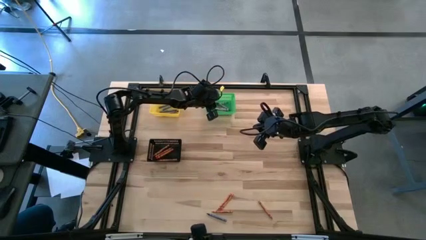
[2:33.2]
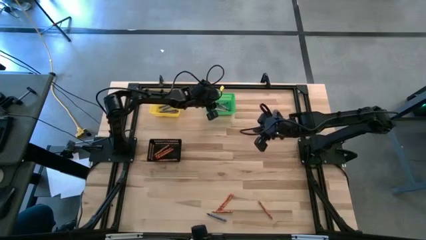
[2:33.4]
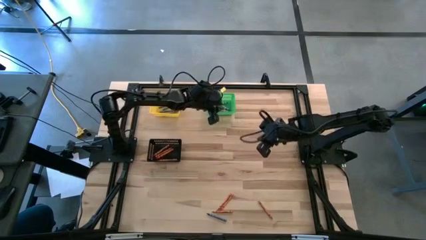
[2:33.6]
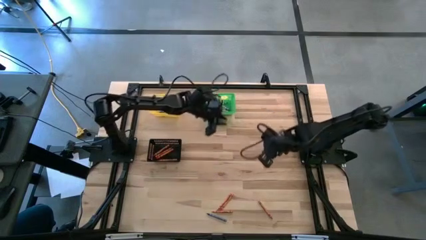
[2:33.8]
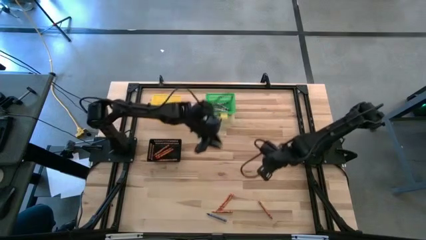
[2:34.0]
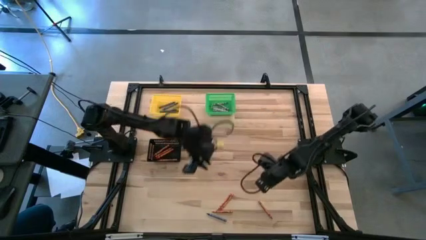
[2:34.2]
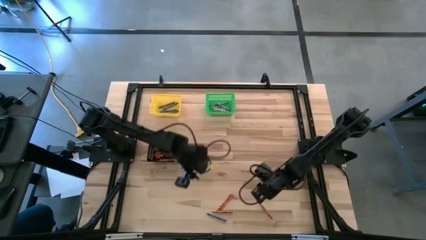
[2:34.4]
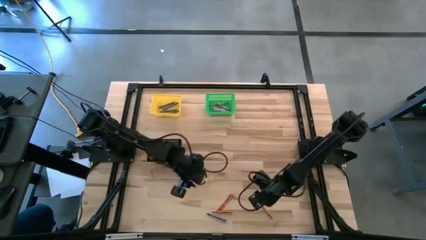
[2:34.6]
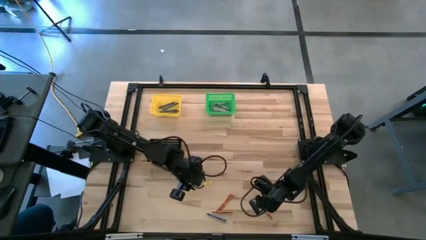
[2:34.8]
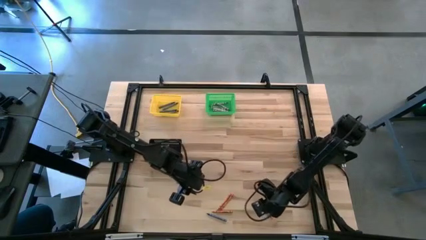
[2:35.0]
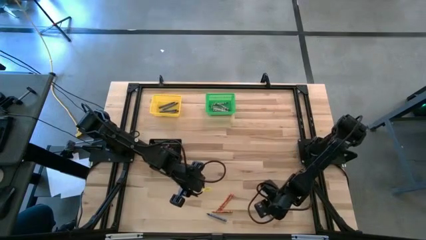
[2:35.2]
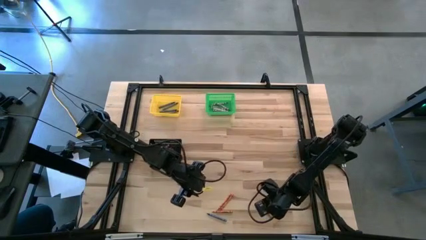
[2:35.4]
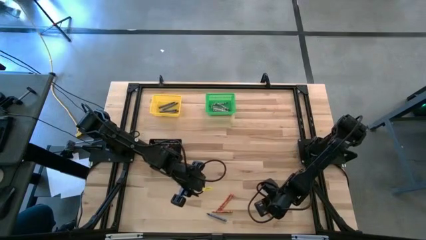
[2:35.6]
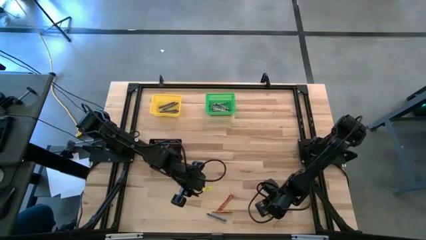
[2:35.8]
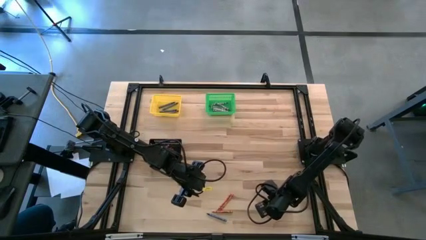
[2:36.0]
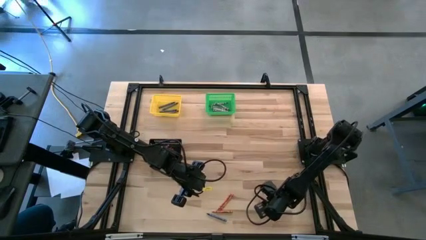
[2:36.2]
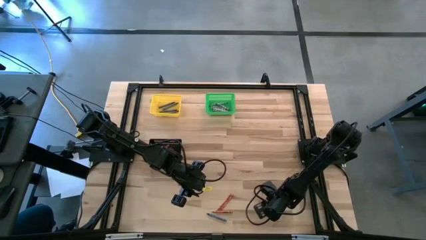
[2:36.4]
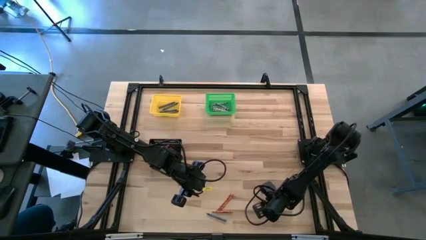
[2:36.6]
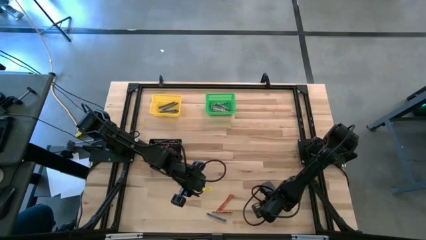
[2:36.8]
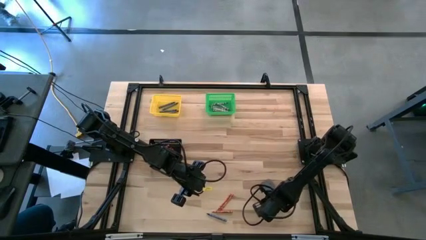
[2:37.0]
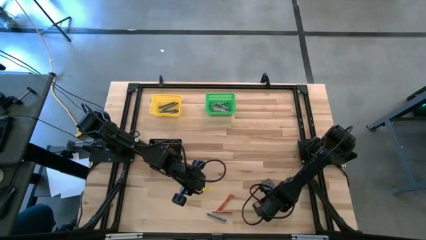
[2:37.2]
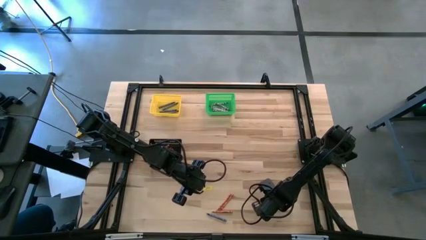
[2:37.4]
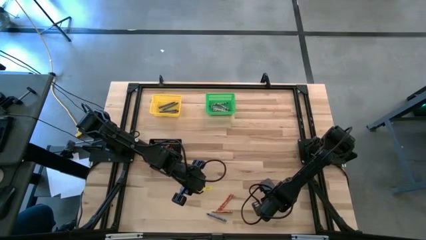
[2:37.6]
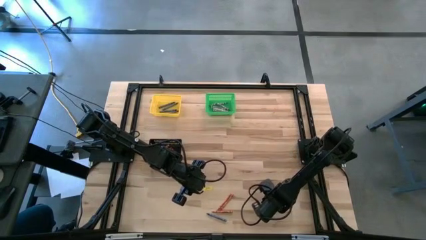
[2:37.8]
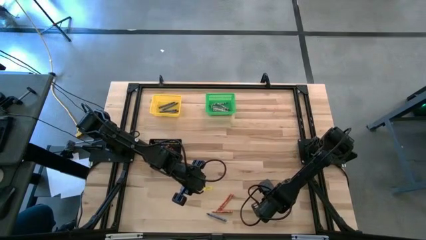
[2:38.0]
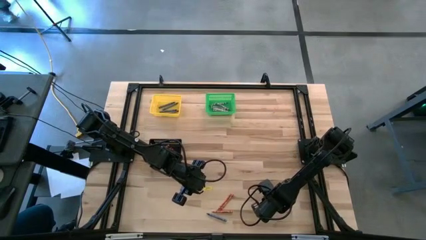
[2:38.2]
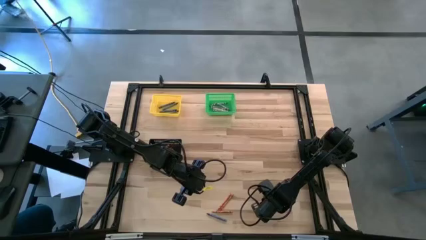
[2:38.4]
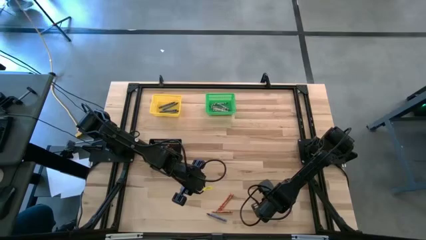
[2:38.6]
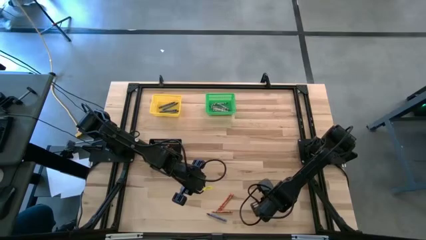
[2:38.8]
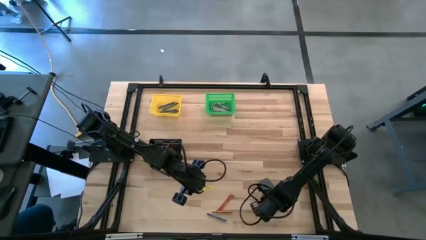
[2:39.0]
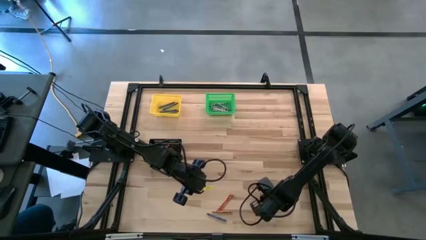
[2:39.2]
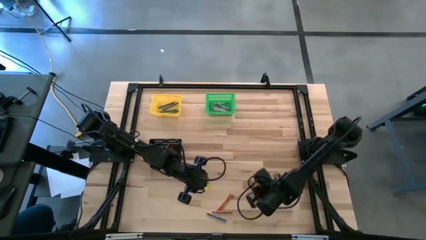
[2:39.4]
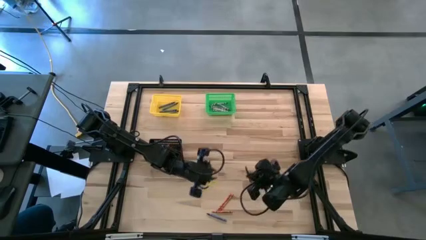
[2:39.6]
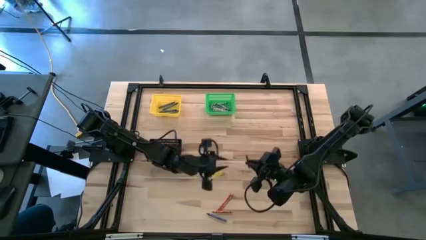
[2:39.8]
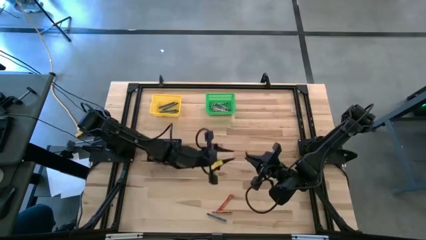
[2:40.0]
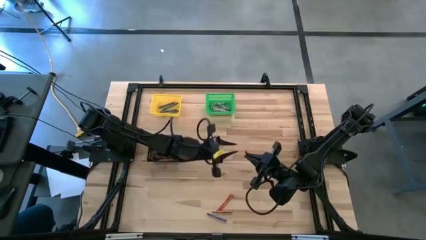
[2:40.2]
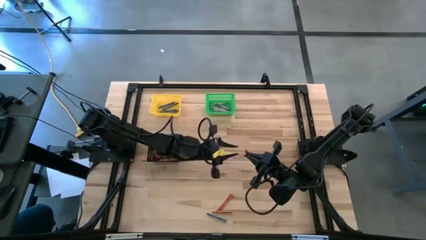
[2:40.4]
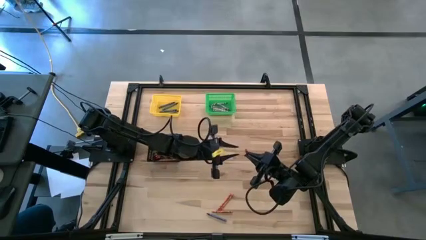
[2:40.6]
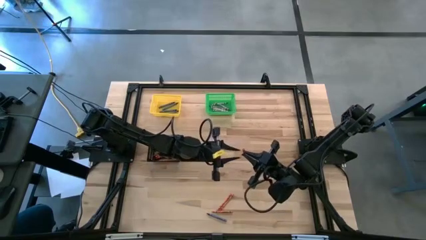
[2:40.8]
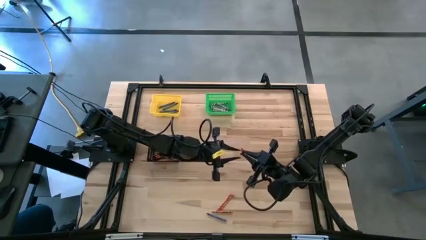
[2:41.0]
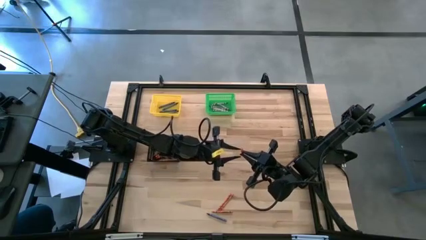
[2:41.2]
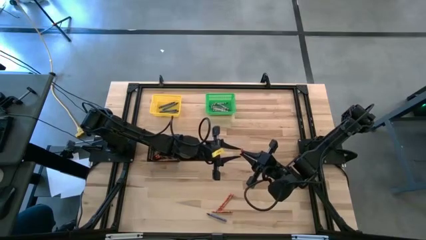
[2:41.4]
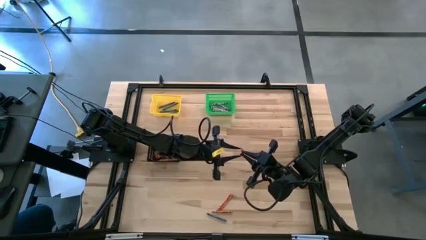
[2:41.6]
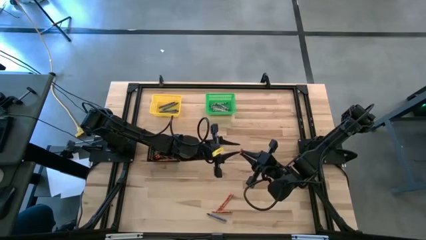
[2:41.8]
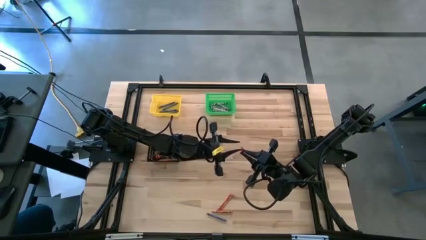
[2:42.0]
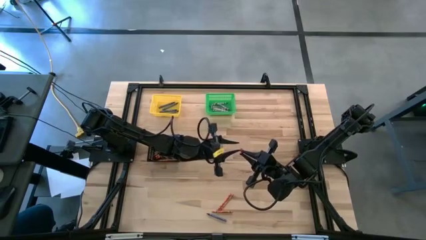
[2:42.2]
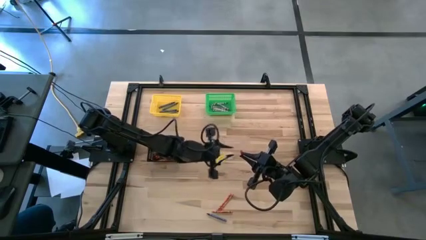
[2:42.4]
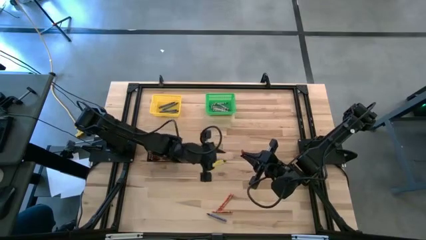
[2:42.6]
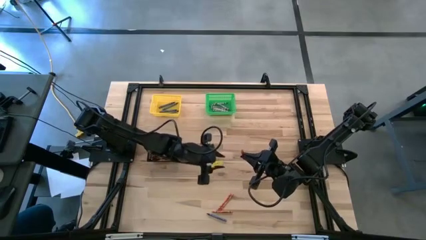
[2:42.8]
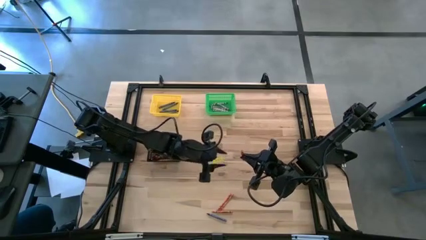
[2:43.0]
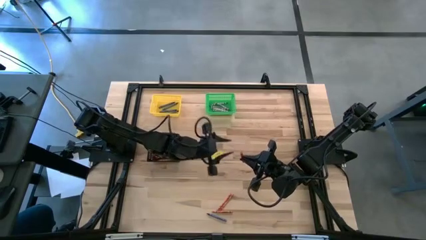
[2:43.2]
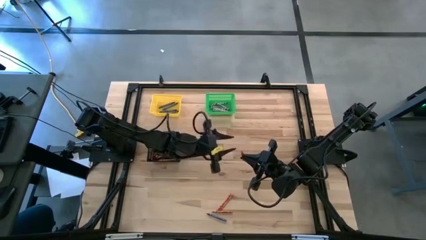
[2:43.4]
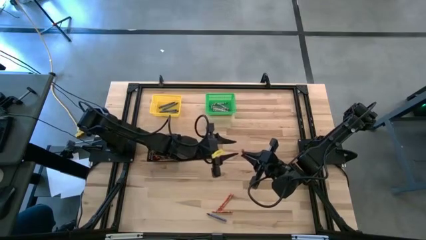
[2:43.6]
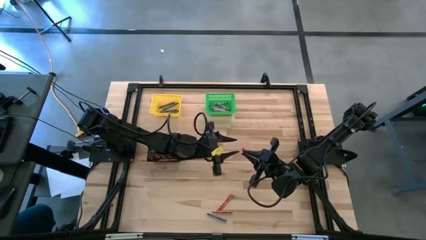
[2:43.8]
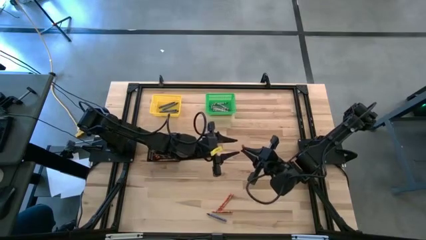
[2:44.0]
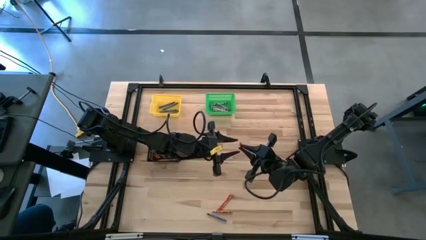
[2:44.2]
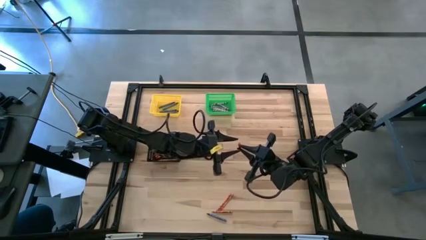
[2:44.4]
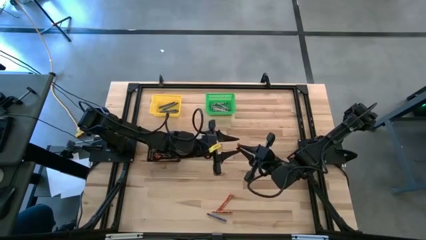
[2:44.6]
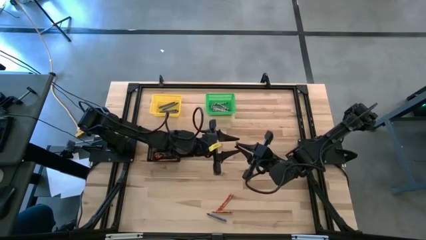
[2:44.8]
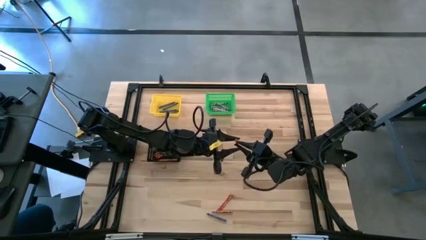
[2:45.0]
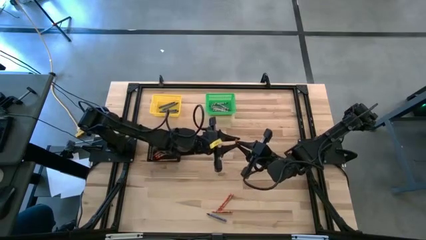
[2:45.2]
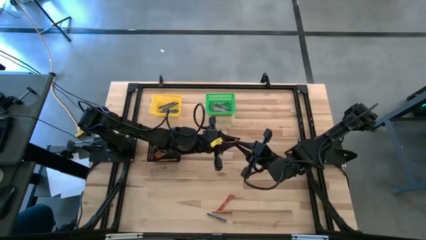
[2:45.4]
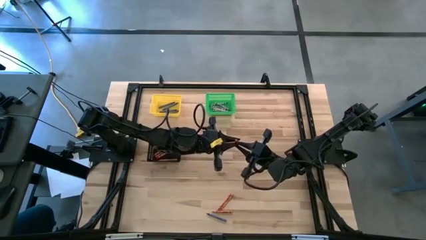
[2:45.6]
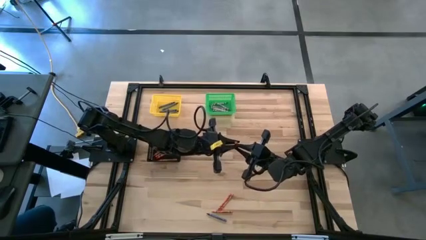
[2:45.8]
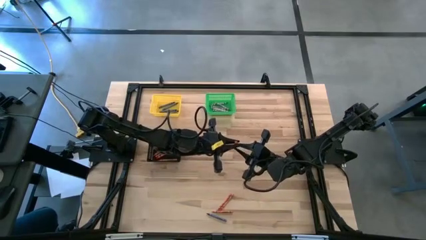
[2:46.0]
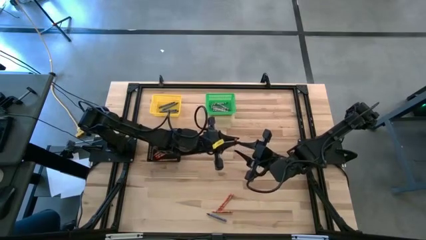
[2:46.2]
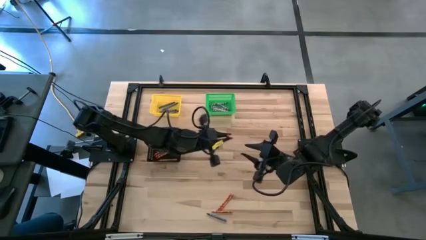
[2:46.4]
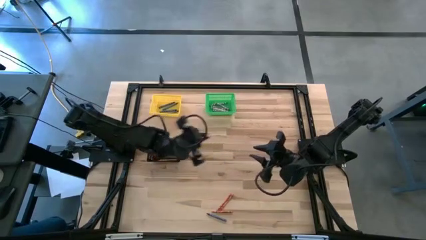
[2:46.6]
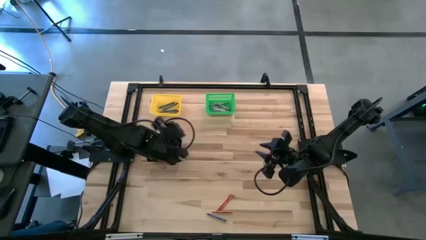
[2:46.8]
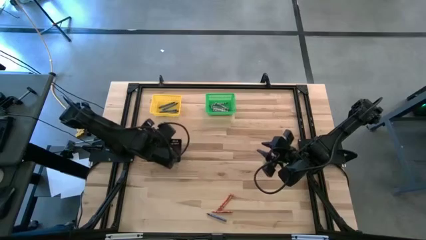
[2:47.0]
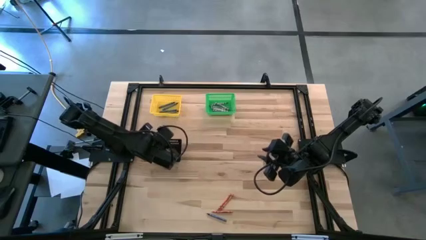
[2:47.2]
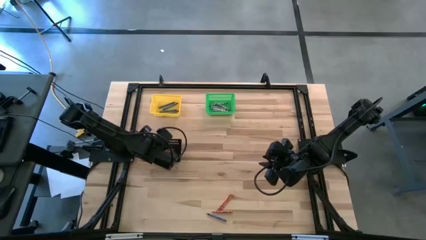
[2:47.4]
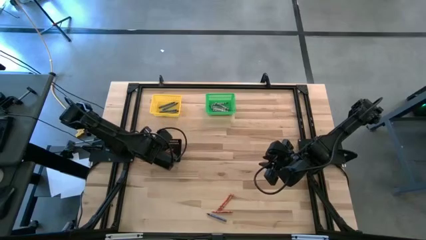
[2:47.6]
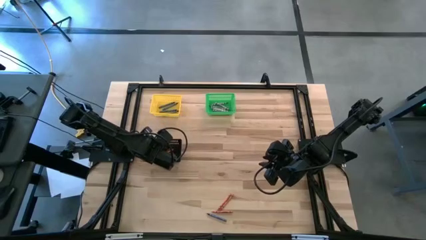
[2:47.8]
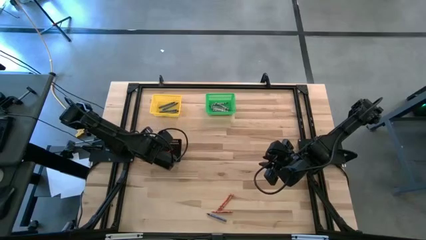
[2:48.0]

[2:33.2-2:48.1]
Task: Sort crayons
Put the orange crayon into the black bin

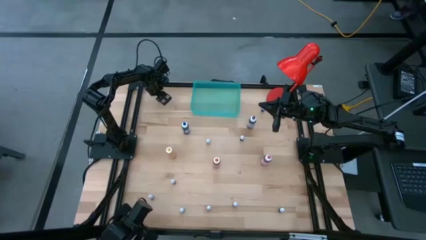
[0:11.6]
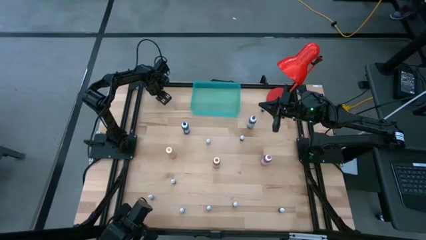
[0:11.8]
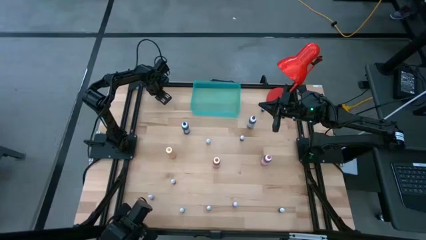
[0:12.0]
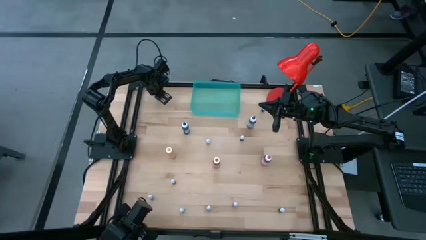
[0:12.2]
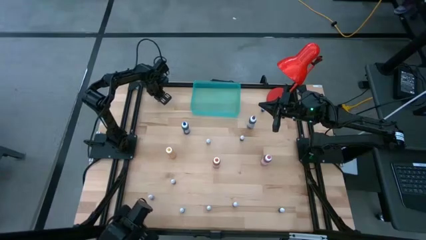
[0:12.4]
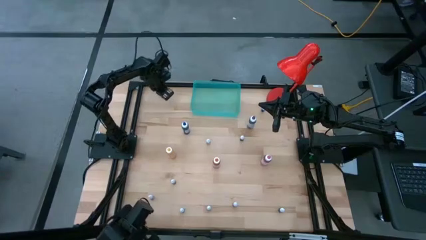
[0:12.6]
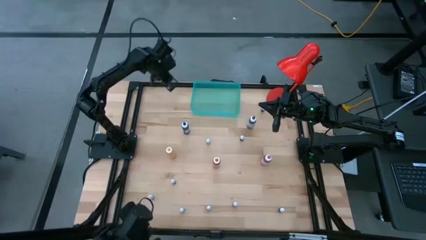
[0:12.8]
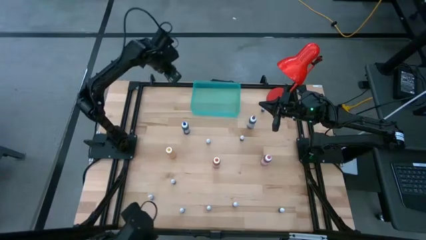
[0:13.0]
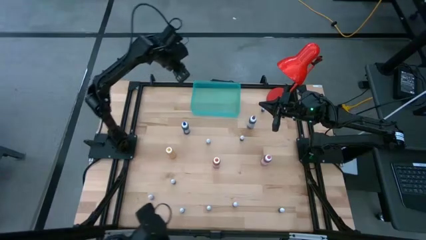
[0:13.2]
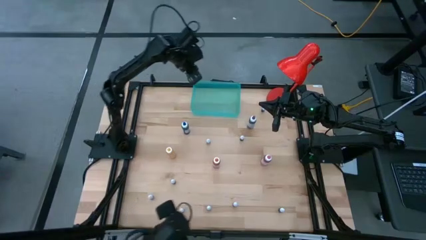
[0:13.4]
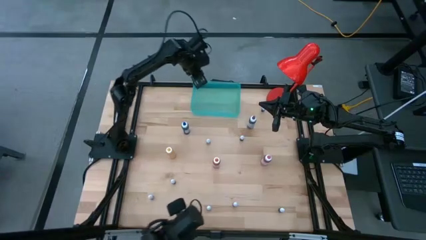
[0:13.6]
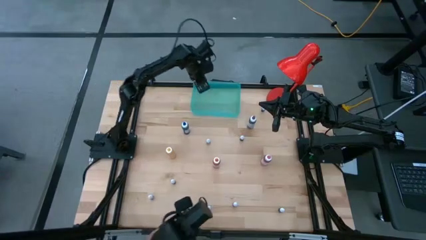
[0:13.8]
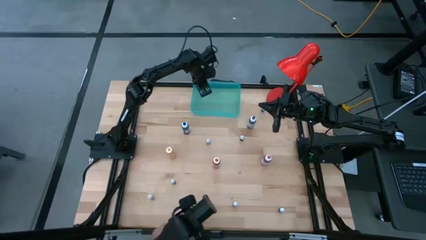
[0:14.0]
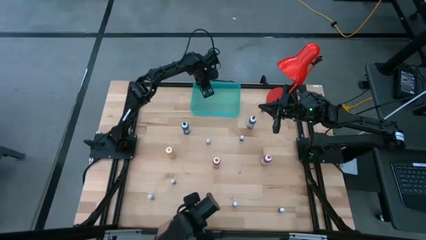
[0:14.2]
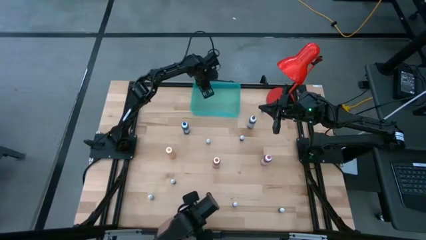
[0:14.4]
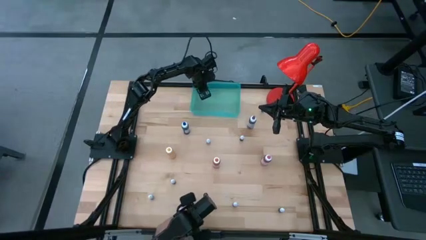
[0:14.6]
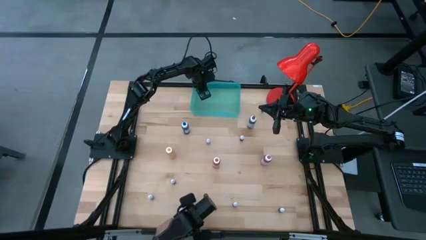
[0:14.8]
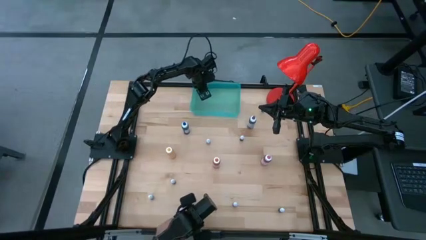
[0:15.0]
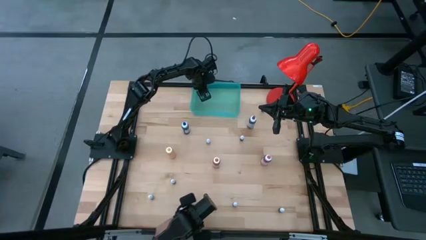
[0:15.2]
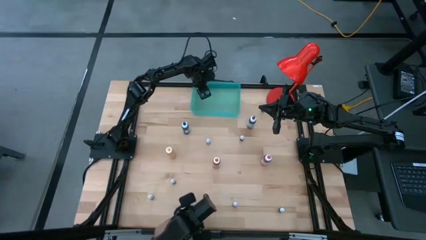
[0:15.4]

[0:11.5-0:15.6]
Task: Pick & Place food coloring
Put the top left black food coloring bottle into the bin
